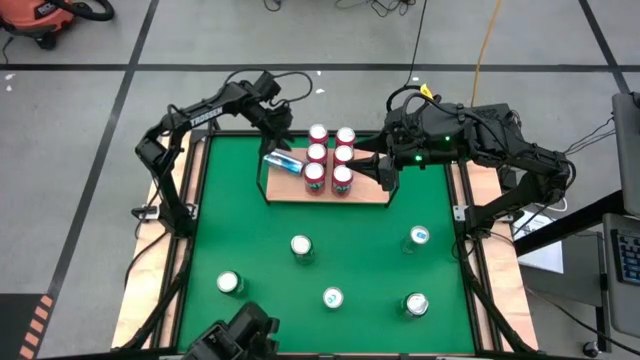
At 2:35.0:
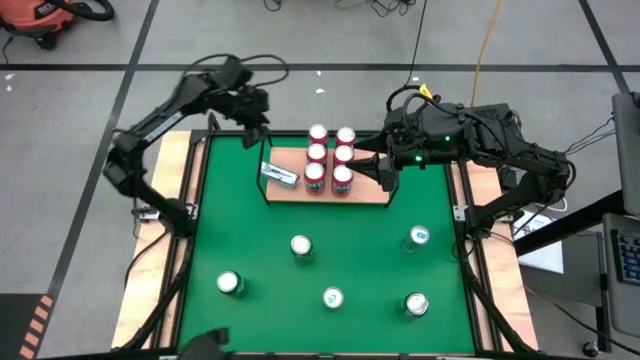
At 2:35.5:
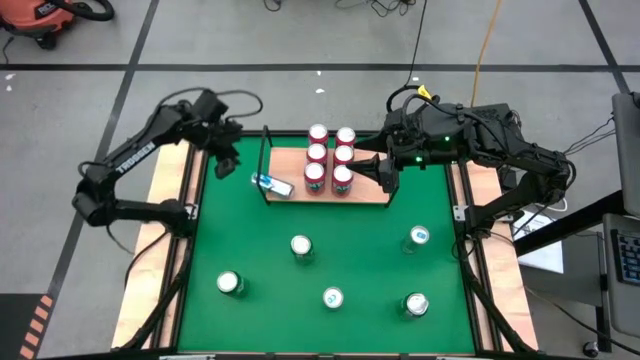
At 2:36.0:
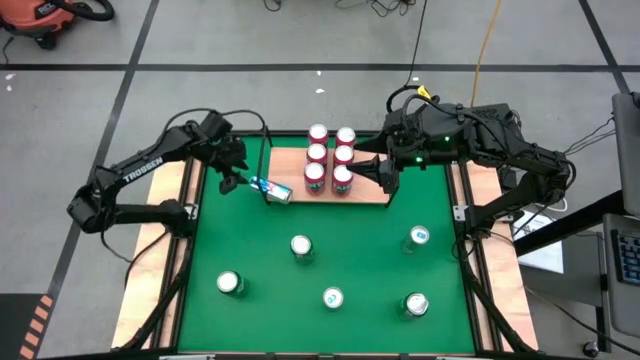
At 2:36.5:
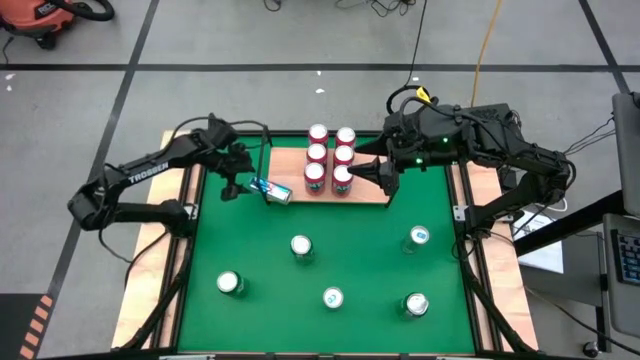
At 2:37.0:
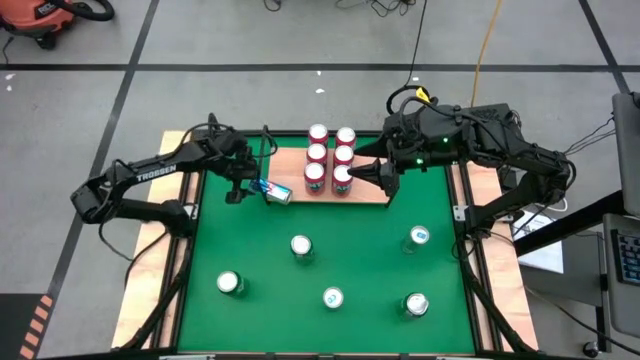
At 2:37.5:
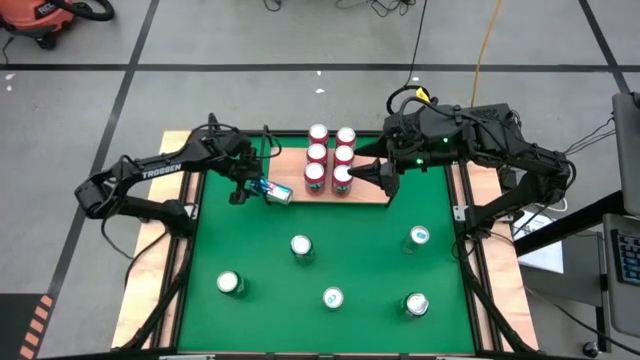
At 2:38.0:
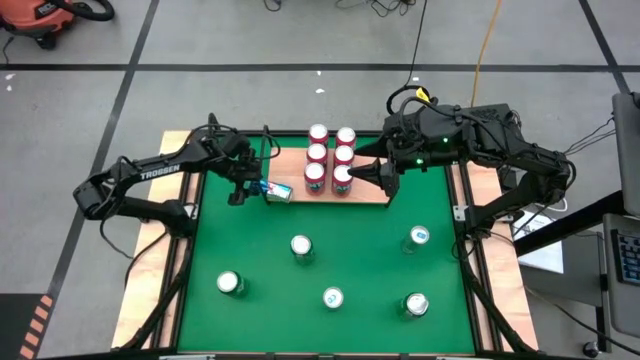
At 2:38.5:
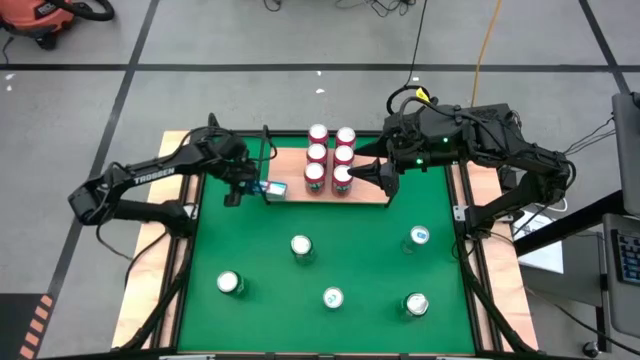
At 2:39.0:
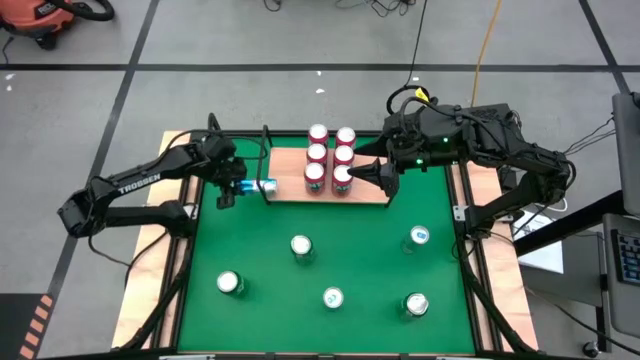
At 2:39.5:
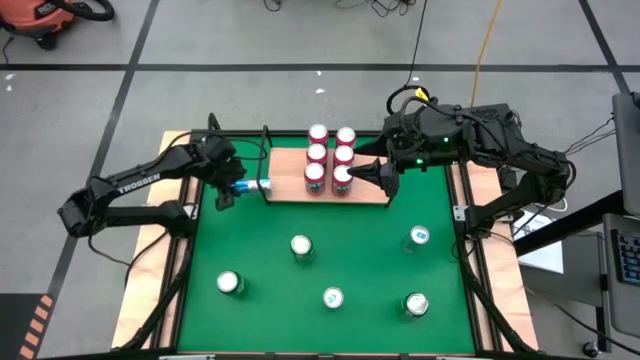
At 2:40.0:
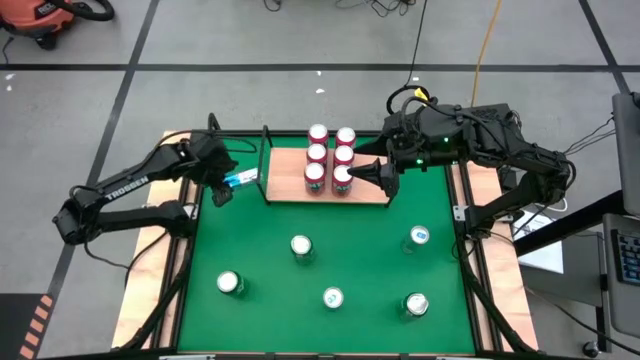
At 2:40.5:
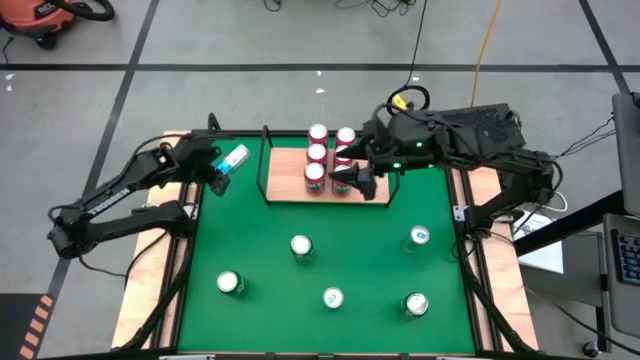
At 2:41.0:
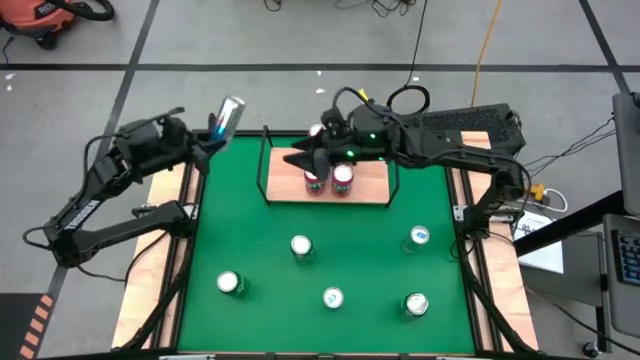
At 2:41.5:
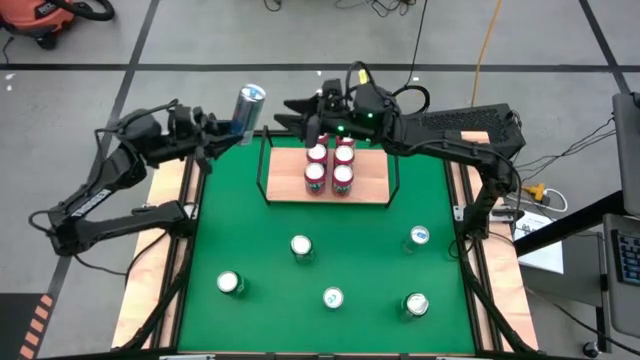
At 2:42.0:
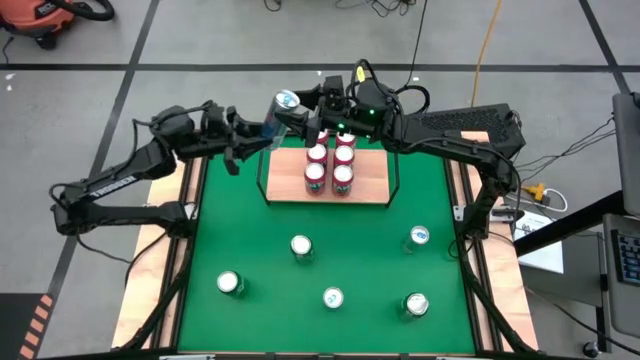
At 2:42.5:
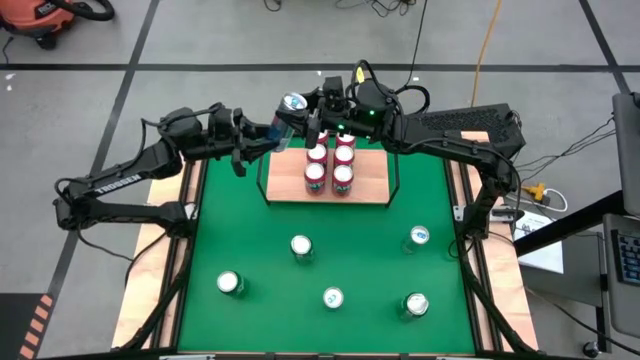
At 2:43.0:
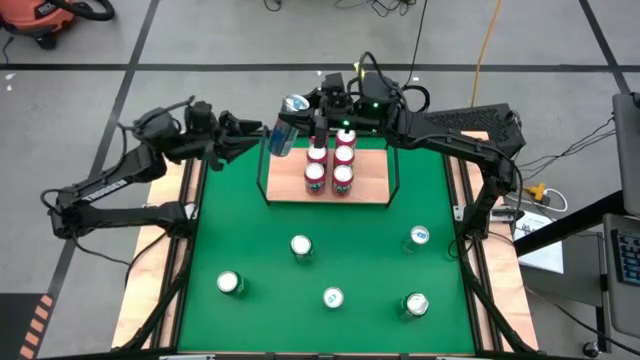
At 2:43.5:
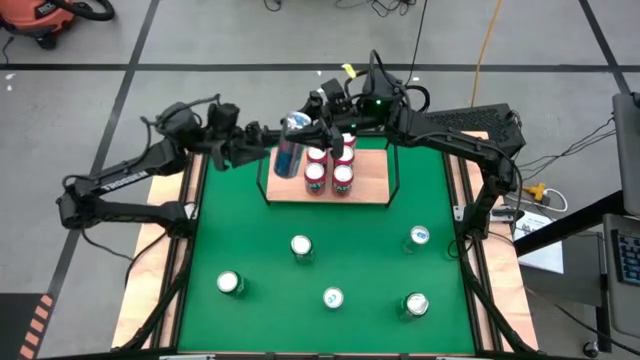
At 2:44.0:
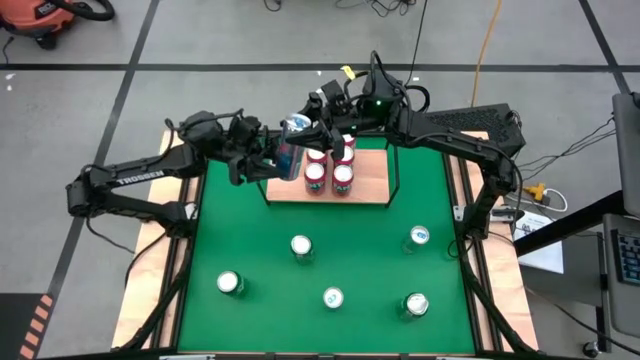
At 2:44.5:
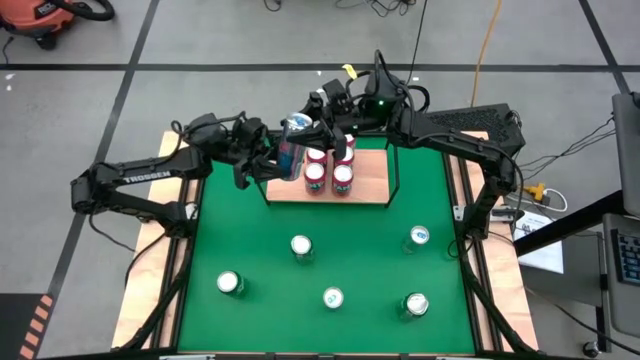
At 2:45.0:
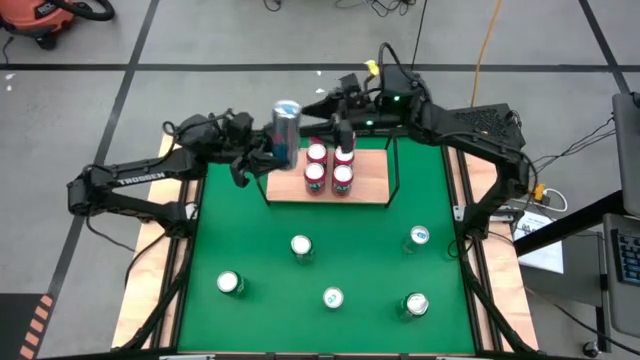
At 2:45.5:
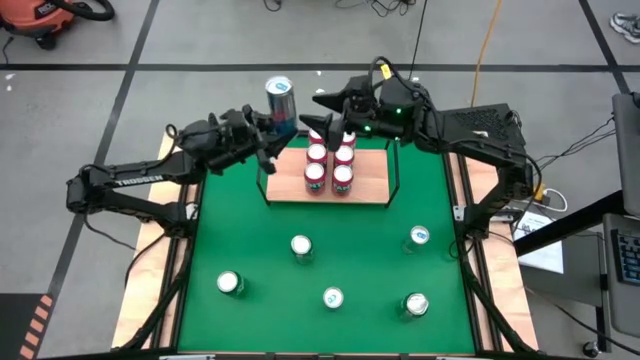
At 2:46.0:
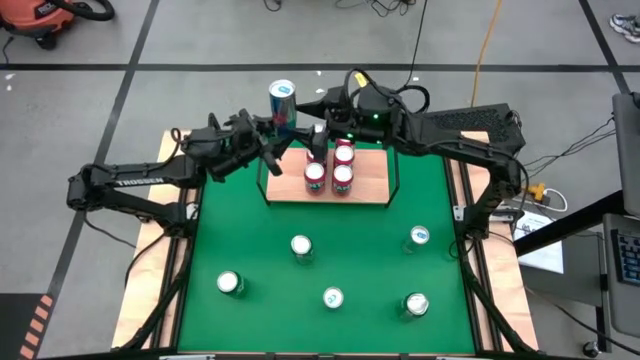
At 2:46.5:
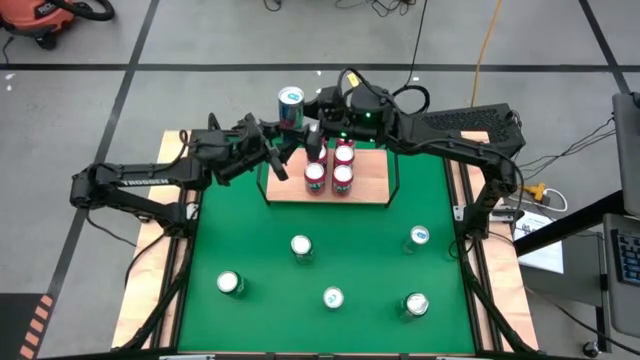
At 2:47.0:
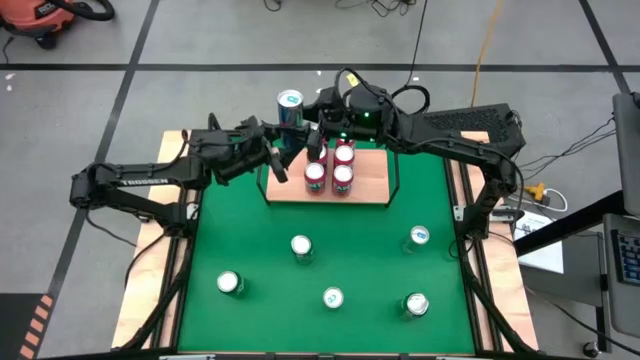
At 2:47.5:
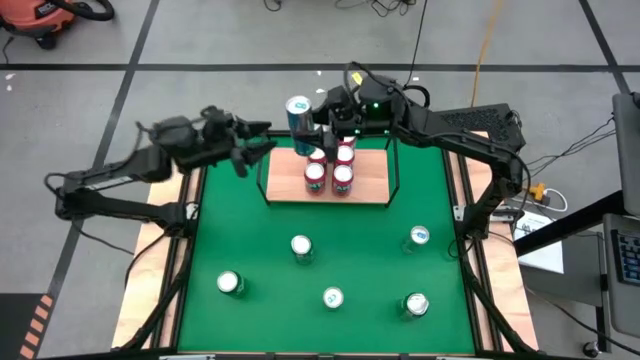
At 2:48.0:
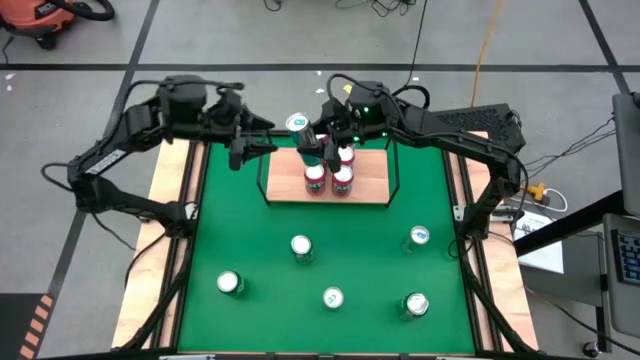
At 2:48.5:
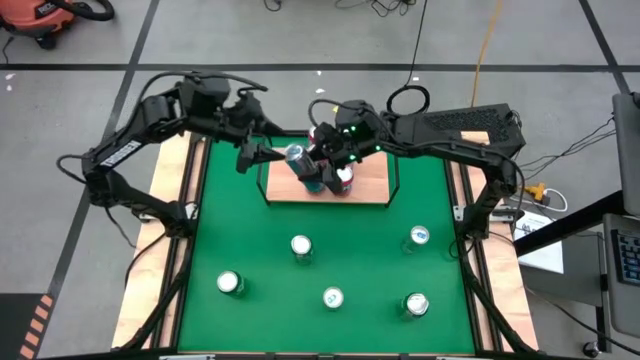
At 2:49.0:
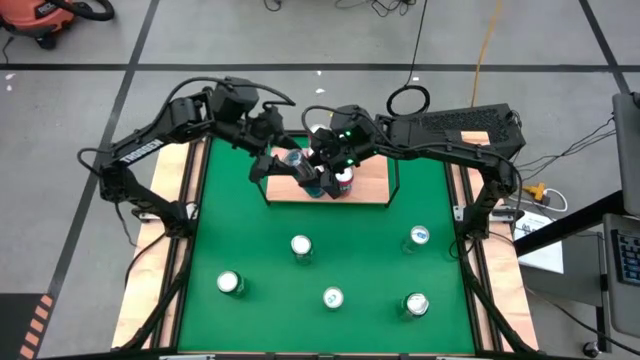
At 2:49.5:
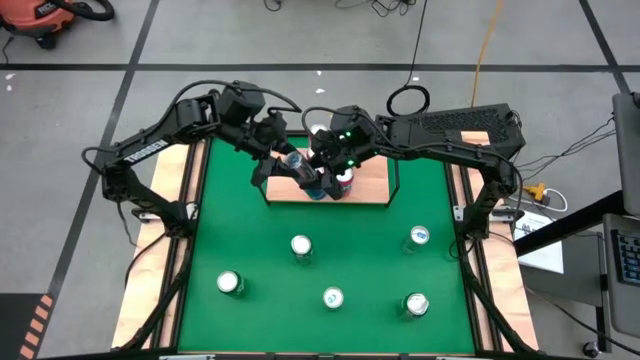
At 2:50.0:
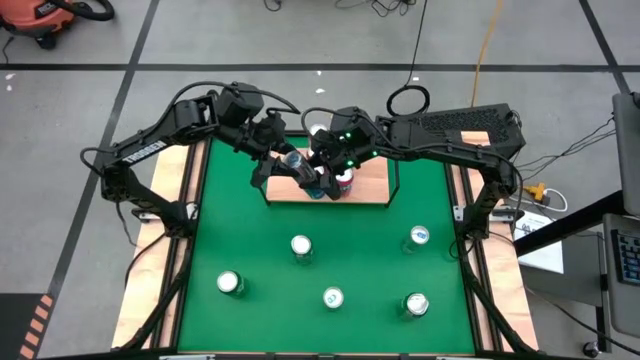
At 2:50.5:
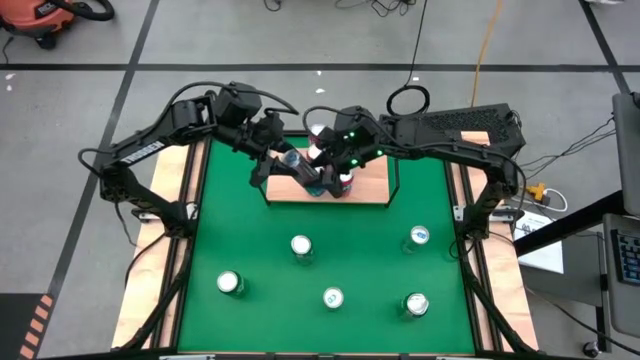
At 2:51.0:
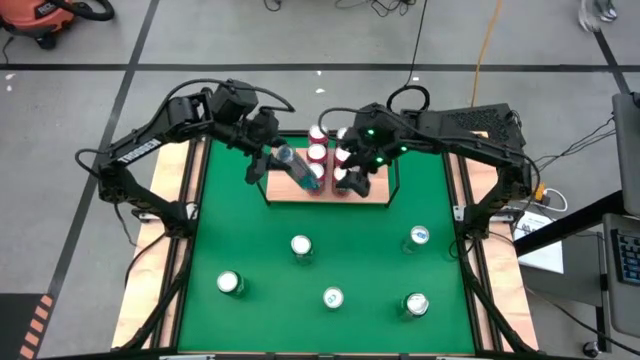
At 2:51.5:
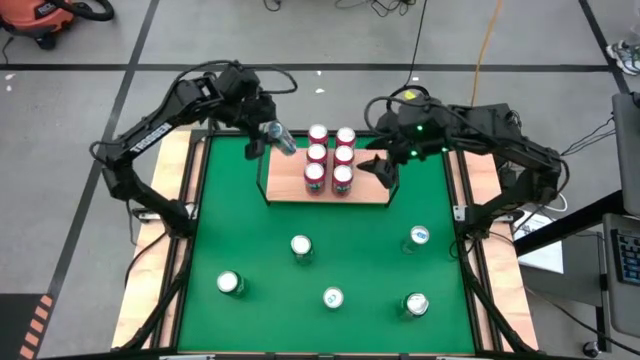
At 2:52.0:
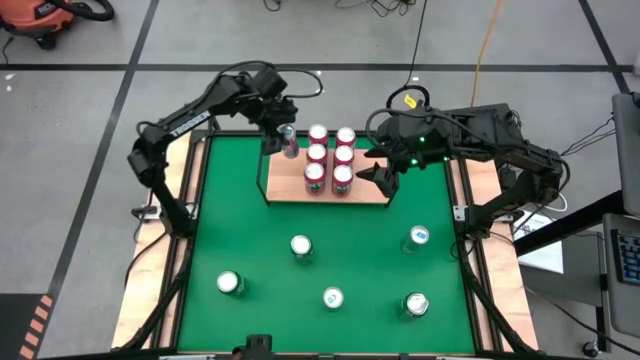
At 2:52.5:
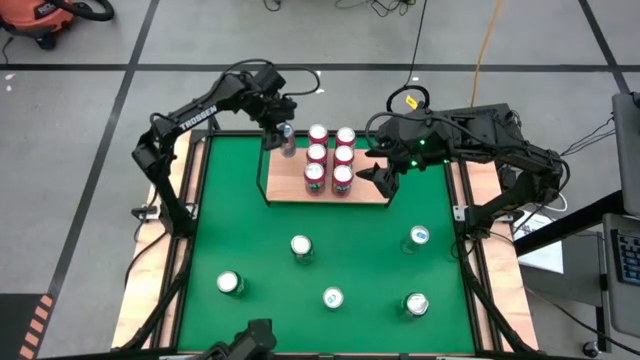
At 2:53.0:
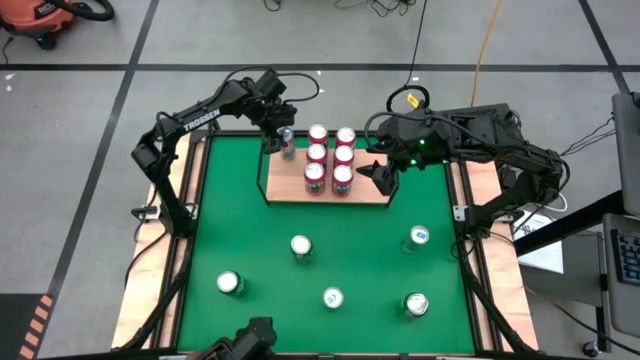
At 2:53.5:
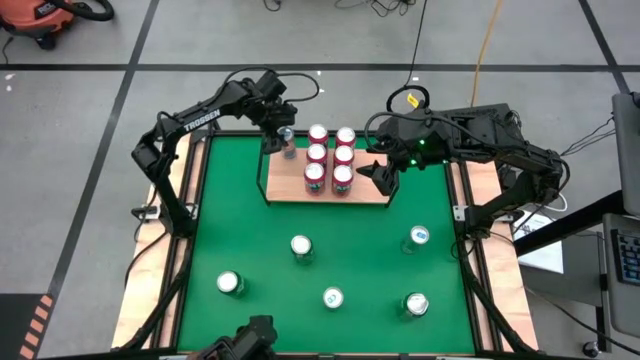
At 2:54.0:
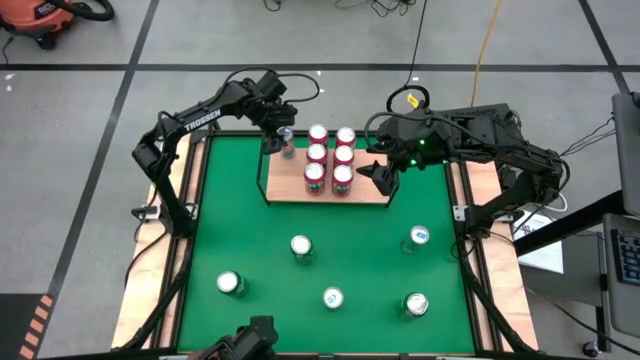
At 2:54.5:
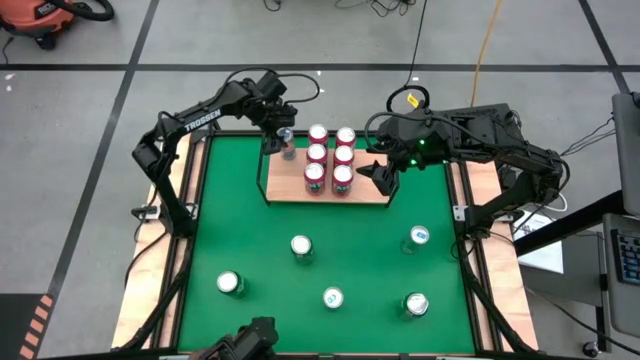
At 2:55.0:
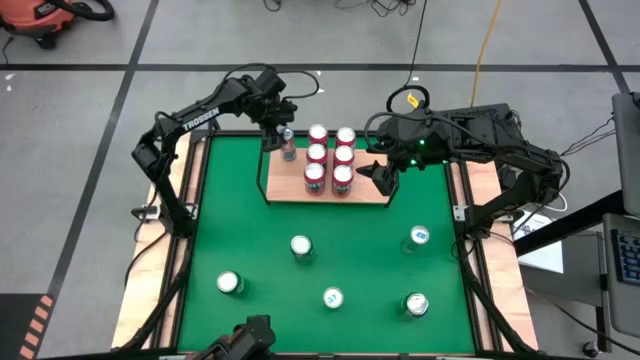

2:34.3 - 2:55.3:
Task: Place canned beverage on shelf
Put the blue soda can on the shelf
